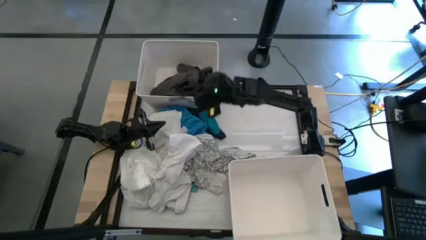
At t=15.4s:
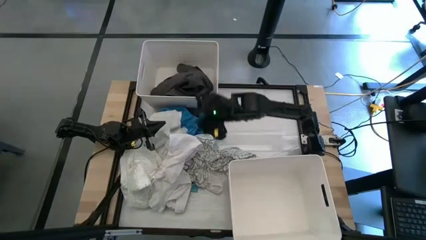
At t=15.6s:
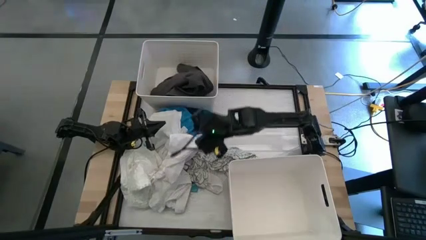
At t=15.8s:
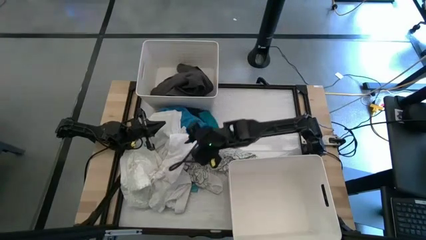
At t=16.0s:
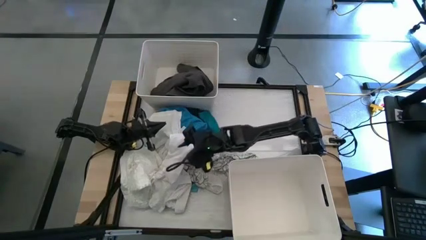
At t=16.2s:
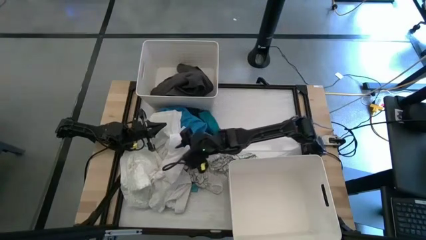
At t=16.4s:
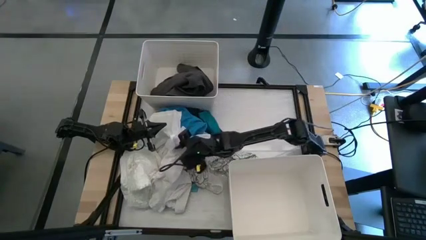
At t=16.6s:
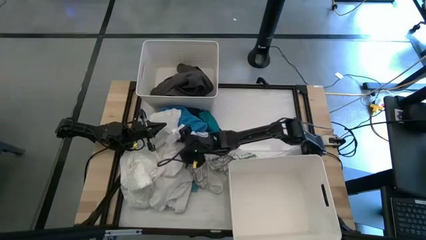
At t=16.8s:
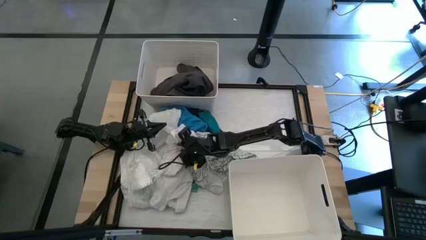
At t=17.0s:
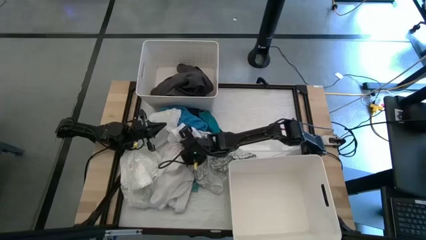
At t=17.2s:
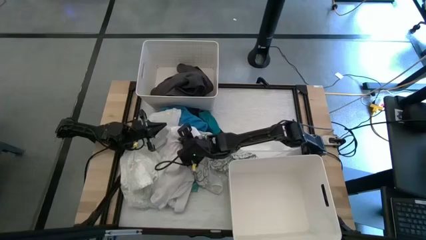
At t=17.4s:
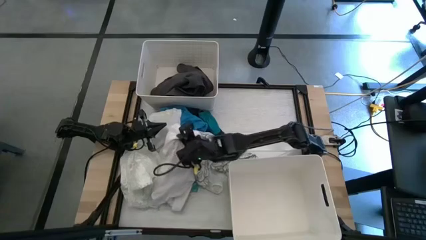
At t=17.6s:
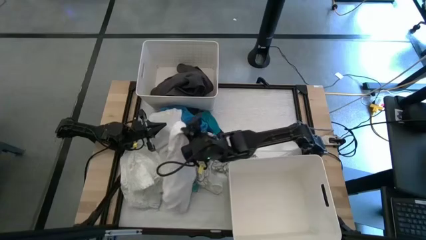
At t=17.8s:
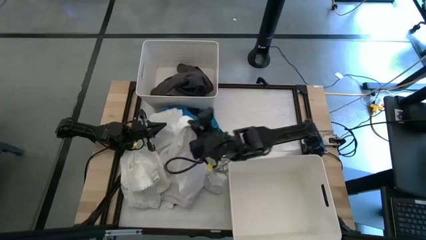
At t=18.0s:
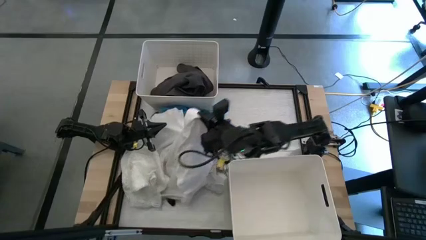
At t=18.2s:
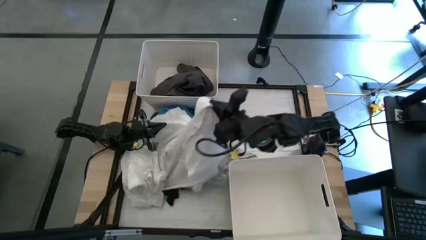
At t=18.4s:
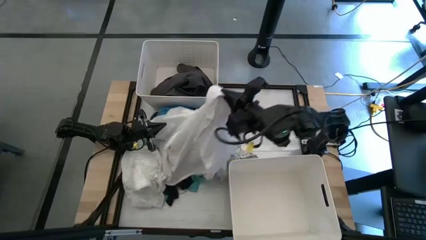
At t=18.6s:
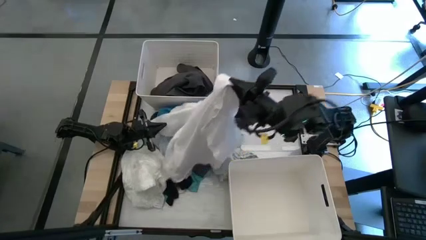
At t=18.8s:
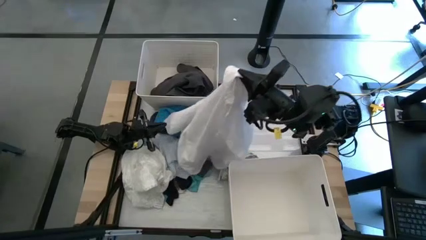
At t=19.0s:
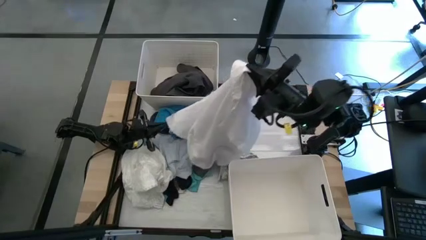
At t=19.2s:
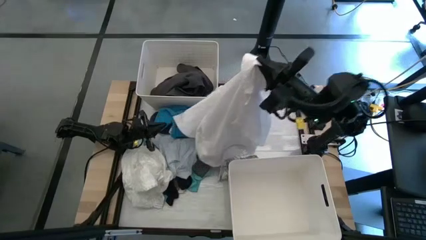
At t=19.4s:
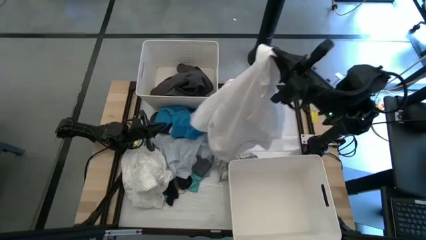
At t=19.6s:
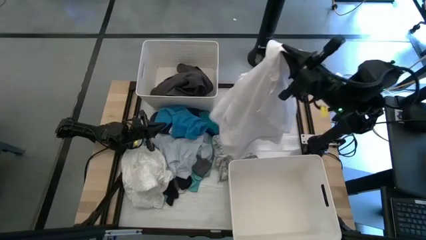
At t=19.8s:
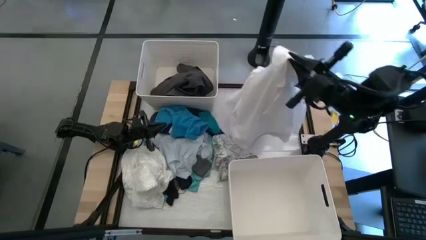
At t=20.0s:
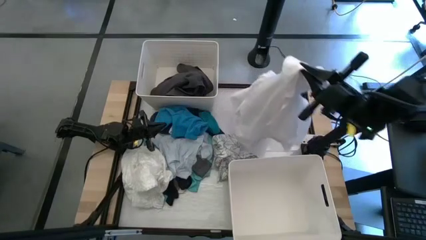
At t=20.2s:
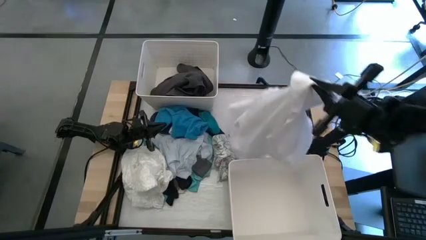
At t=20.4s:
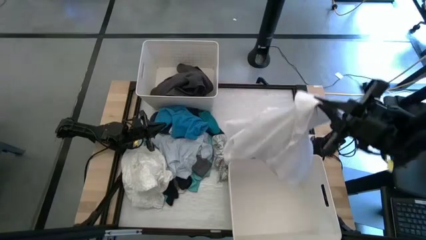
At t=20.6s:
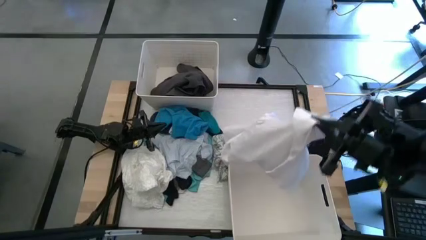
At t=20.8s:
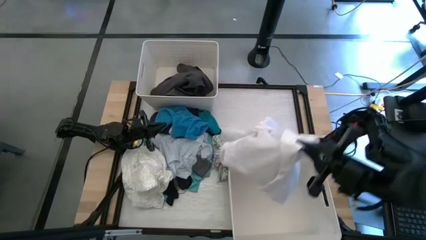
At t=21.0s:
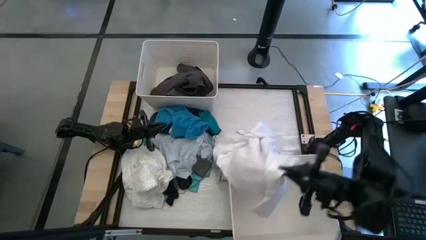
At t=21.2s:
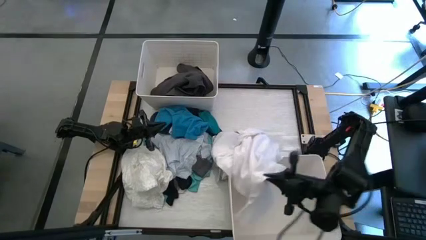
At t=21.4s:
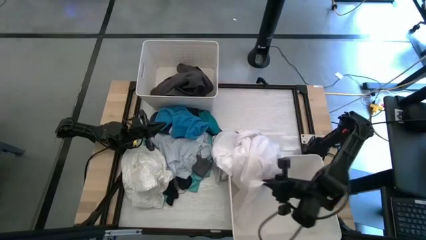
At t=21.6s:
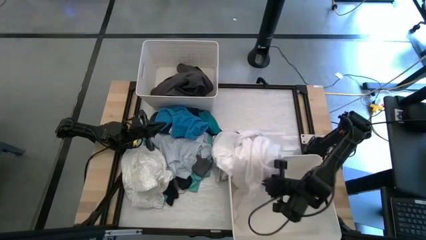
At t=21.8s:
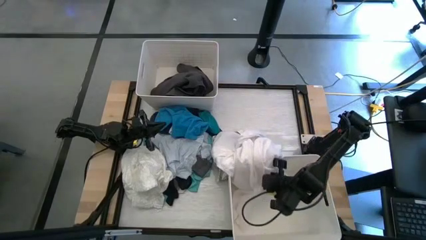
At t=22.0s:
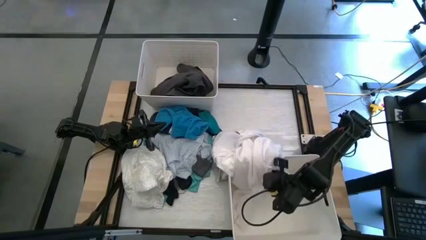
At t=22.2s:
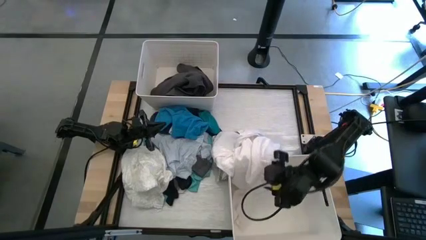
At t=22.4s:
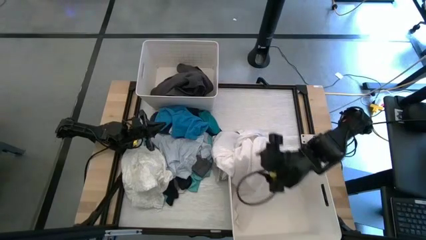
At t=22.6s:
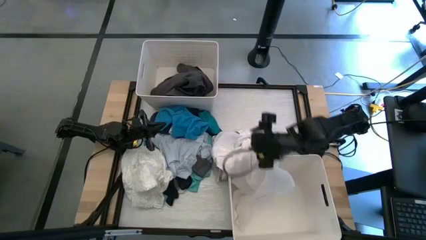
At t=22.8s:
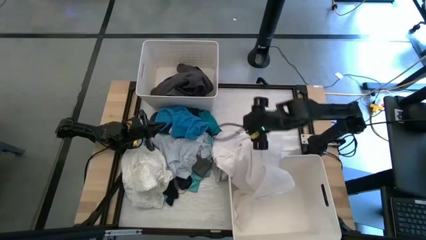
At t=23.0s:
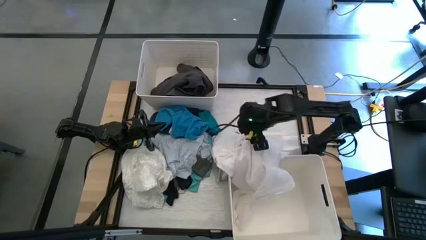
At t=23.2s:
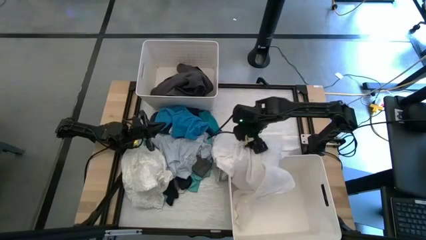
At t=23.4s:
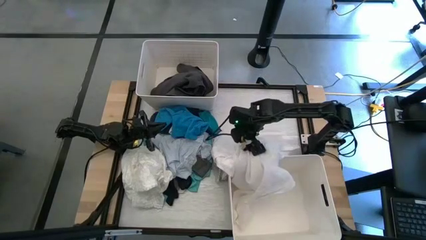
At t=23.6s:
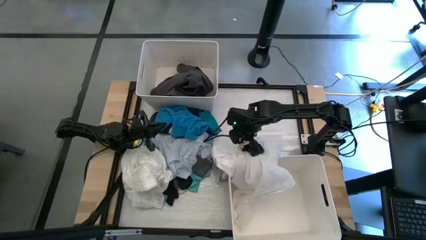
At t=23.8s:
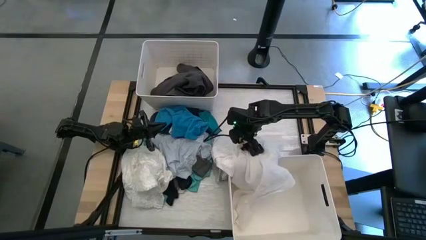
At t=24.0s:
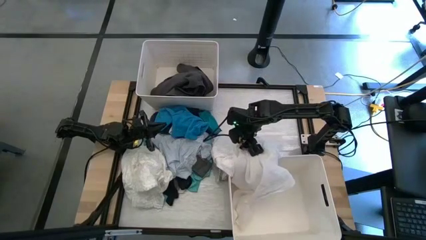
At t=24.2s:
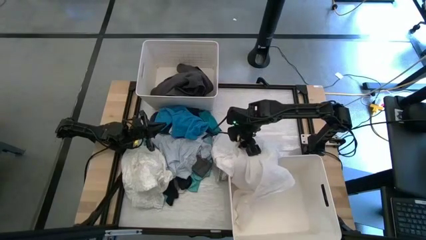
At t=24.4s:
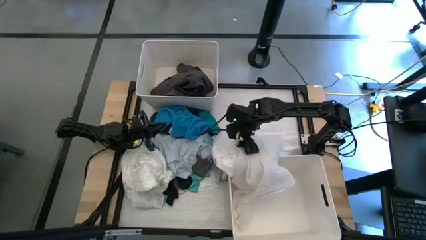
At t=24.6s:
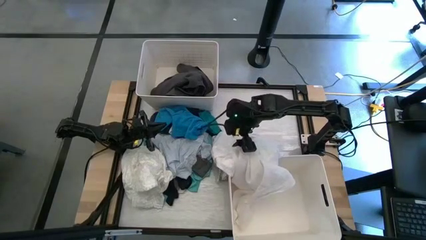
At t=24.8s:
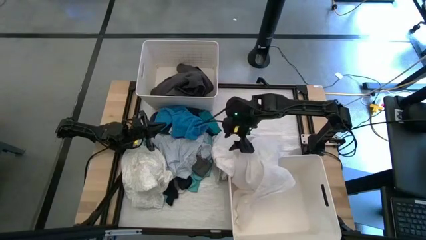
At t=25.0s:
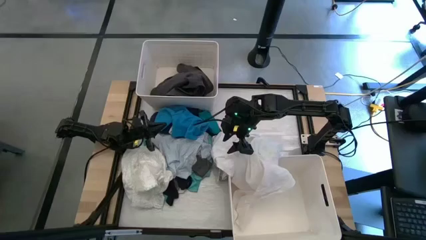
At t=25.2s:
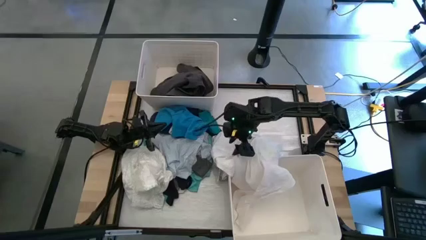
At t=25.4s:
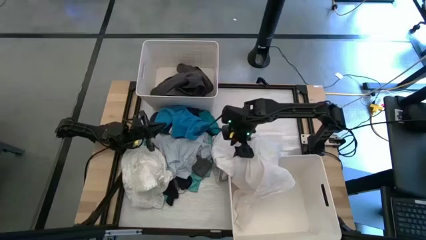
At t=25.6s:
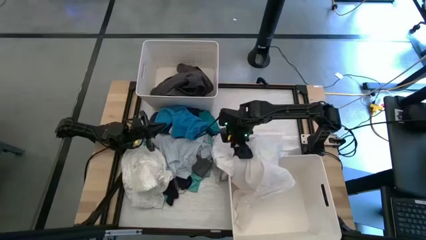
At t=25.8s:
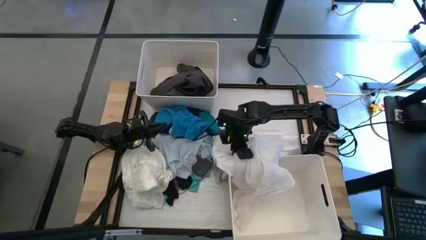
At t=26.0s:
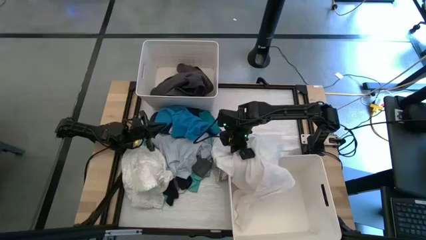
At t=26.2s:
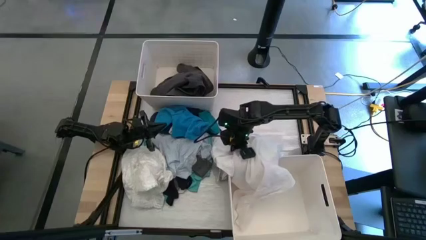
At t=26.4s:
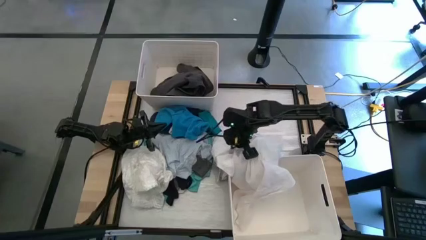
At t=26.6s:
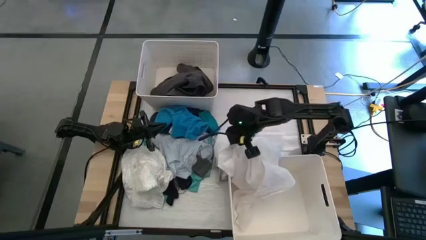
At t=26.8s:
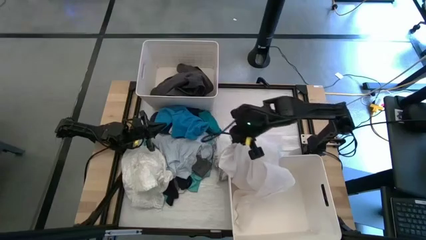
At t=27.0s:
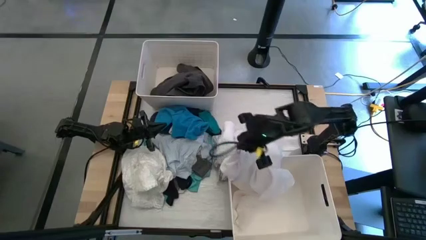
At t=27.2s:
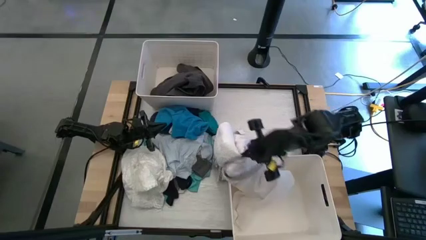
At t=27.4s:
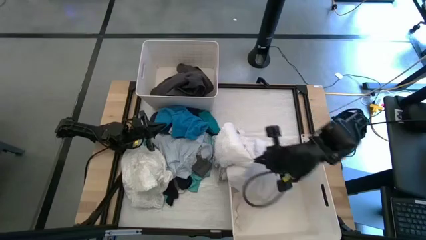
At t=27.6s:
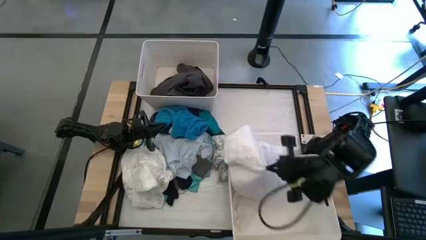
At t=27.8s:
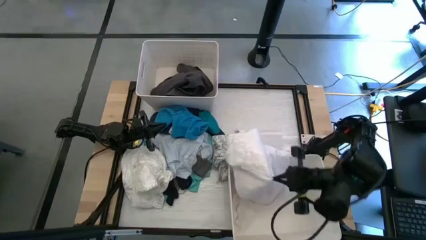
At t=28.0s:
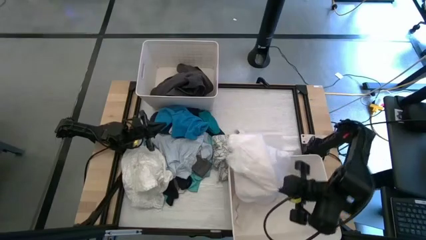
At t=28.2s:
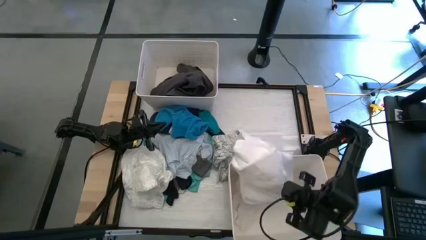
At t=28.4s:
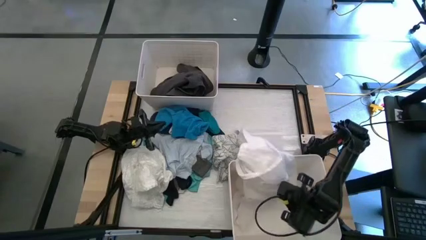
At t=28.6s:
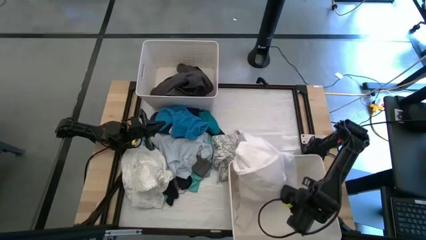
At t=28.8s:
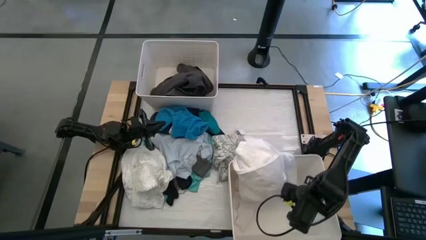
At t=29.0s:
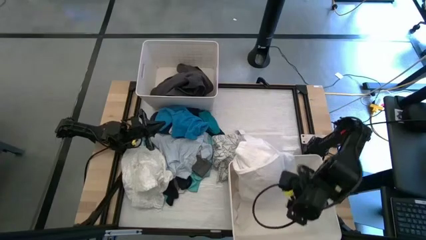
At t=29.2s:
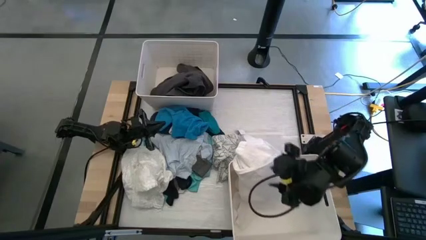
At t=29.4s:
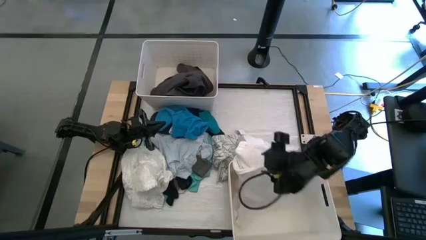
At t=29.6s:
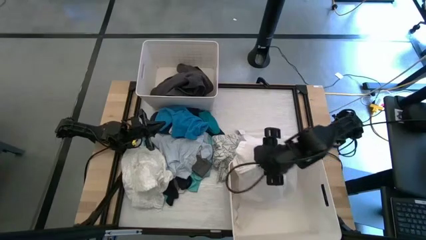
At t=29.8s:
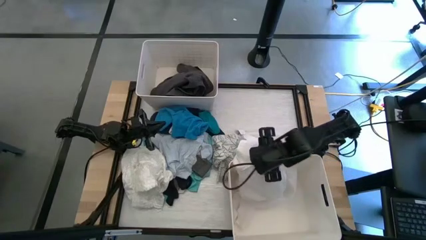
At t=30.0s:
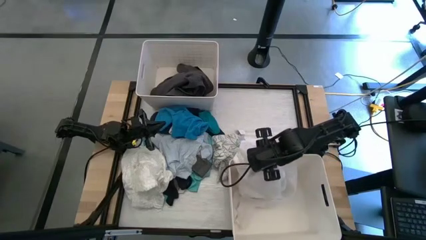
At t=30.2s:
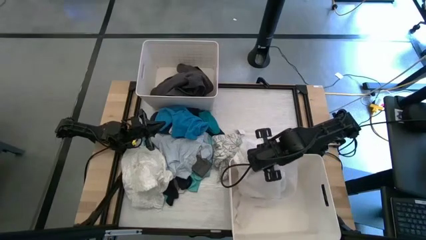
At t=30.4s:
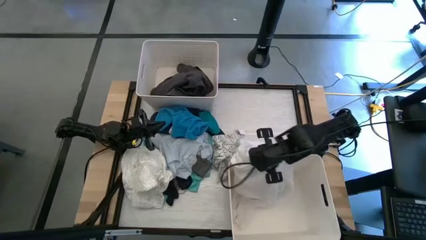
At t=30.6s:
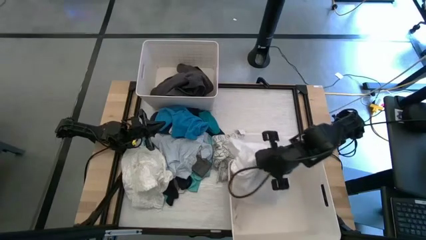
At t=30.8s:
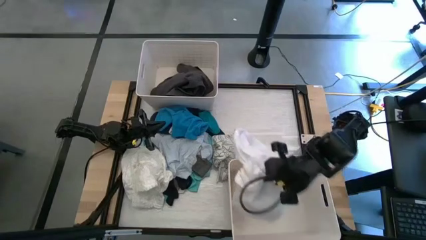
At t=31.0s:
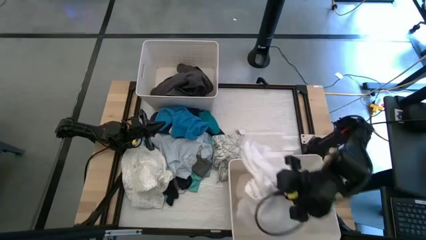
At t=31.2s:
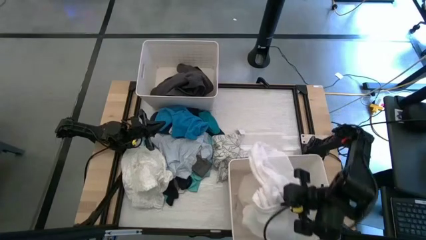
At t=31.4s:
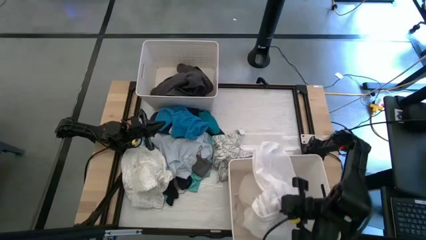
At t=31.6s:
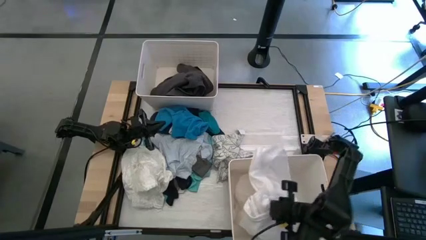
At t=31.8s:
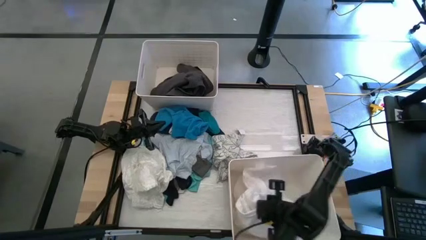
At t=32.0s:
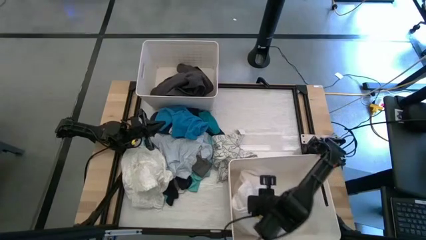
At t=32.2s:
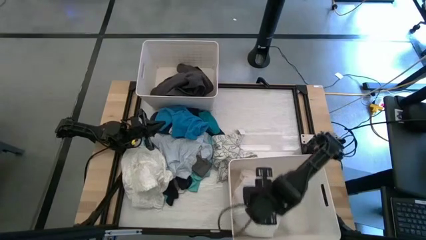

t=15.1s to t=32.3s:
Task: Sort clothes
Put the white shirt into the bottom white laundry organizer
